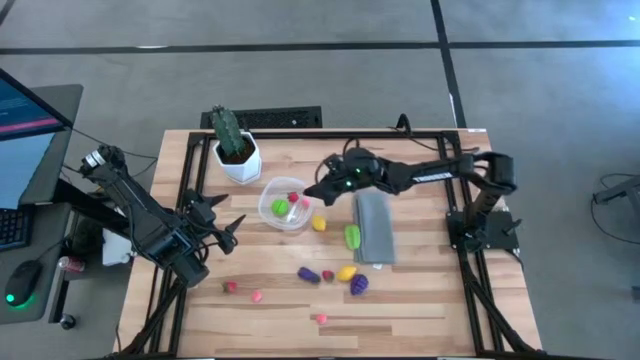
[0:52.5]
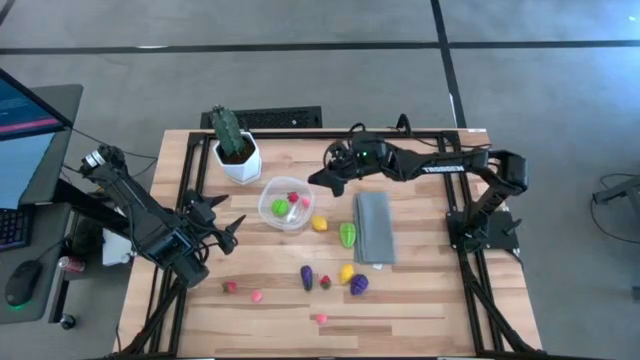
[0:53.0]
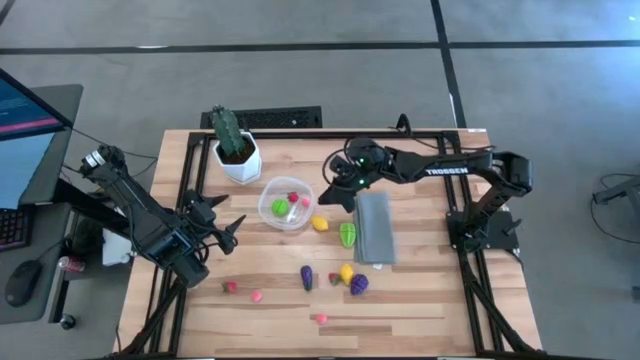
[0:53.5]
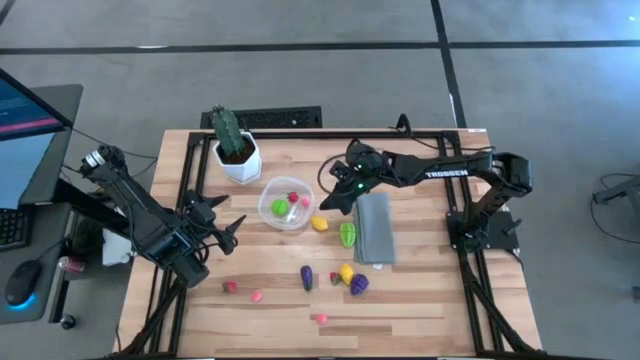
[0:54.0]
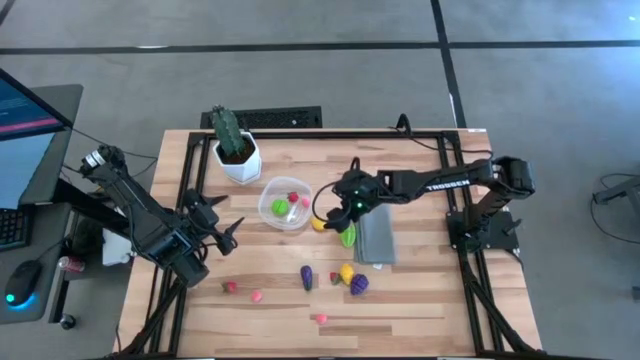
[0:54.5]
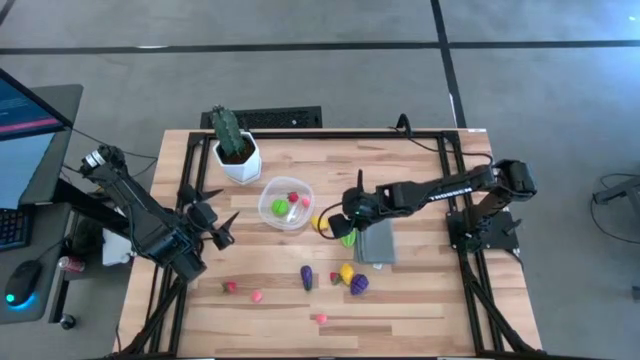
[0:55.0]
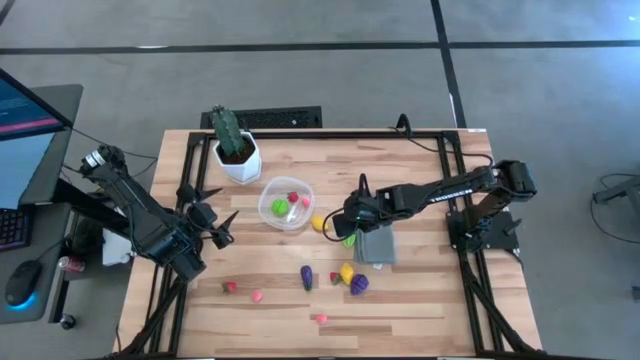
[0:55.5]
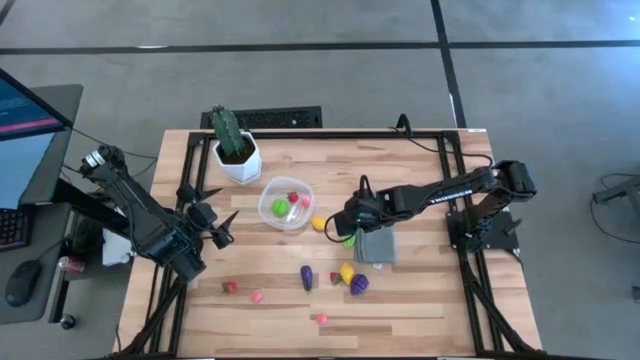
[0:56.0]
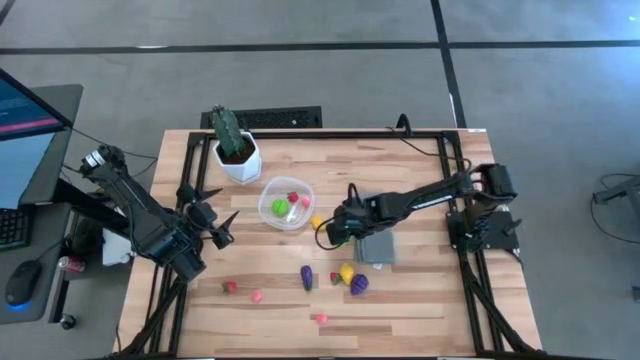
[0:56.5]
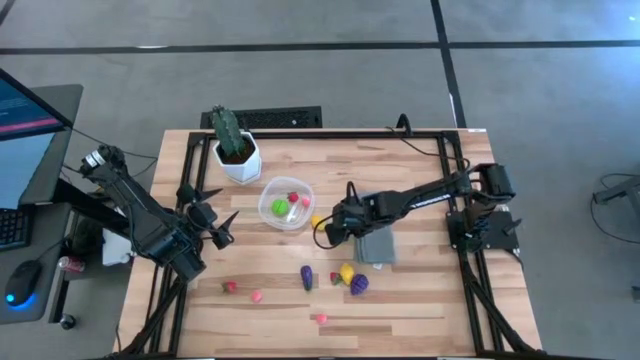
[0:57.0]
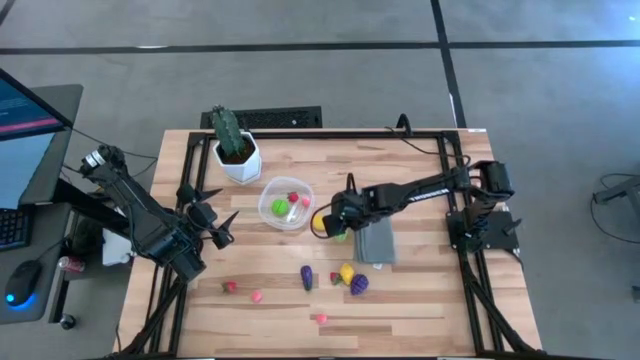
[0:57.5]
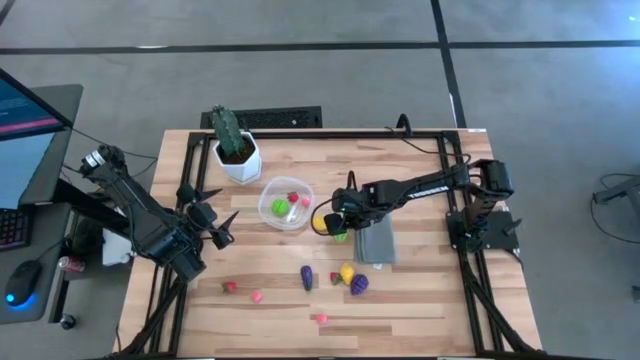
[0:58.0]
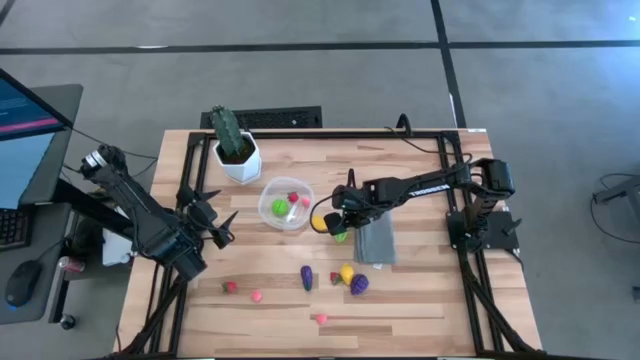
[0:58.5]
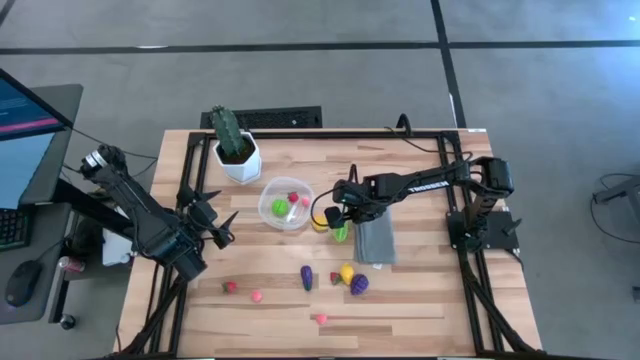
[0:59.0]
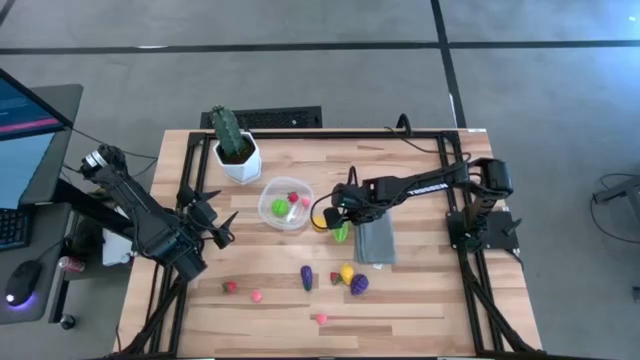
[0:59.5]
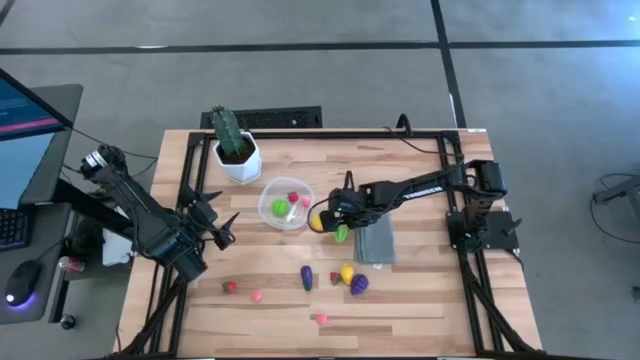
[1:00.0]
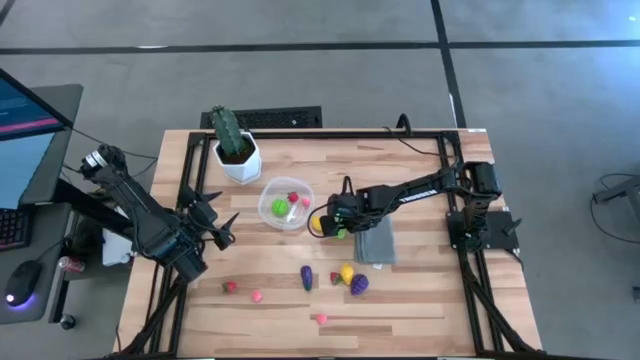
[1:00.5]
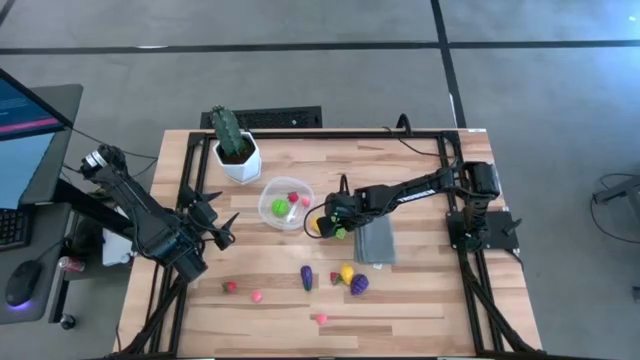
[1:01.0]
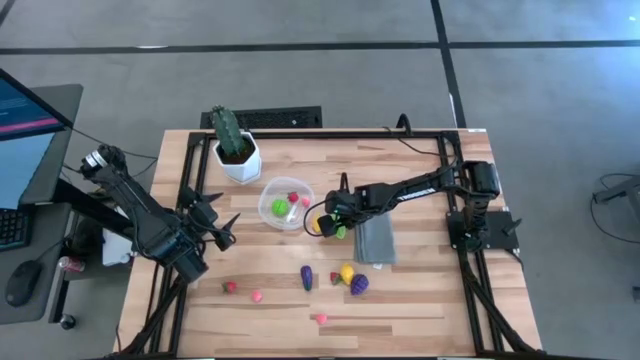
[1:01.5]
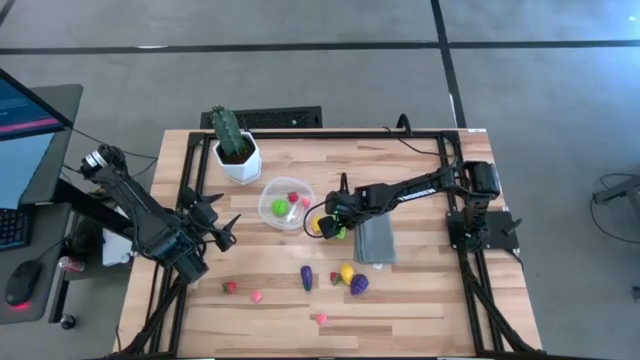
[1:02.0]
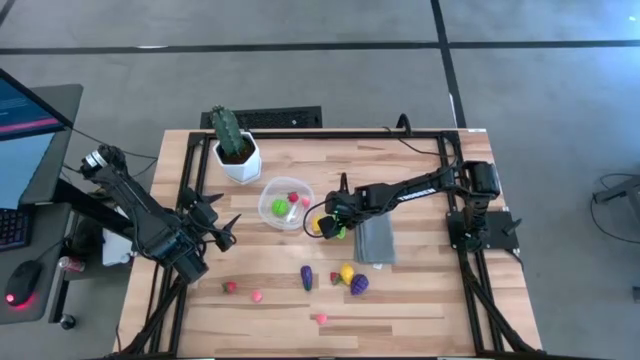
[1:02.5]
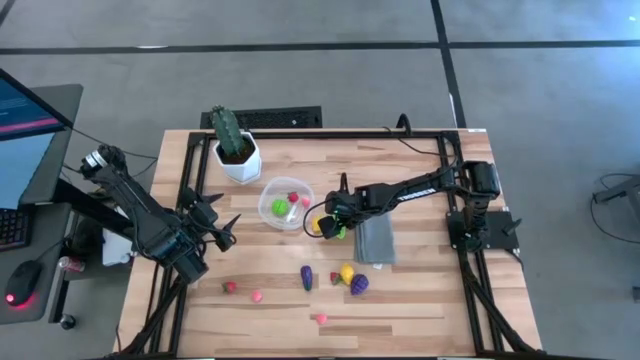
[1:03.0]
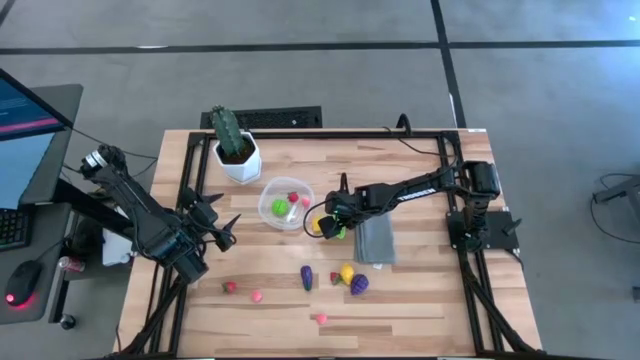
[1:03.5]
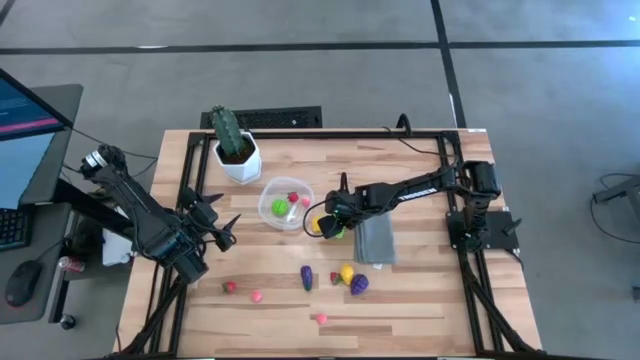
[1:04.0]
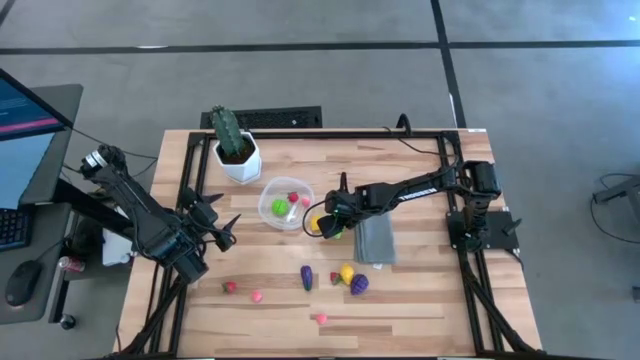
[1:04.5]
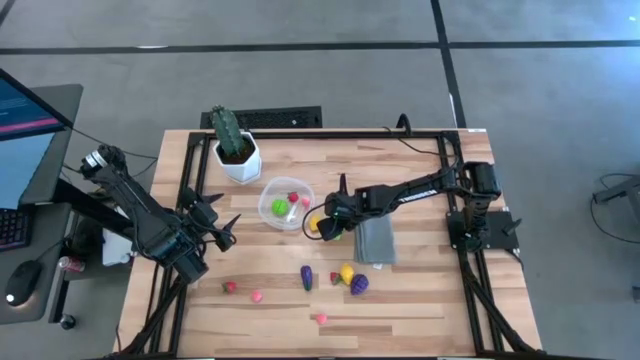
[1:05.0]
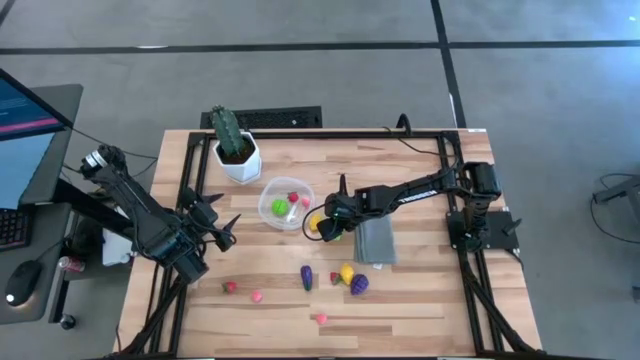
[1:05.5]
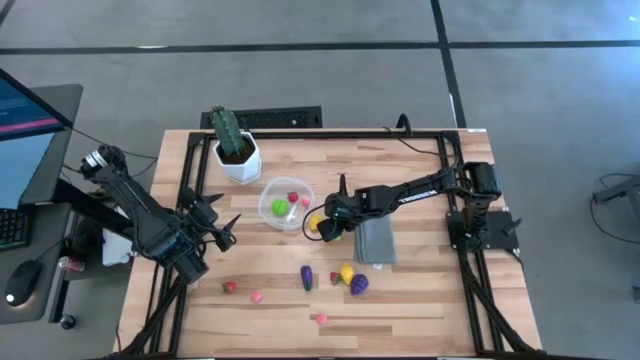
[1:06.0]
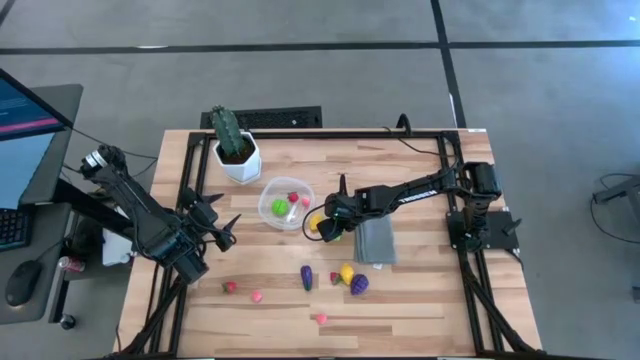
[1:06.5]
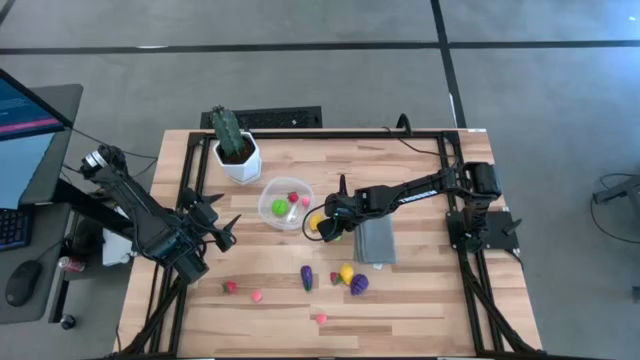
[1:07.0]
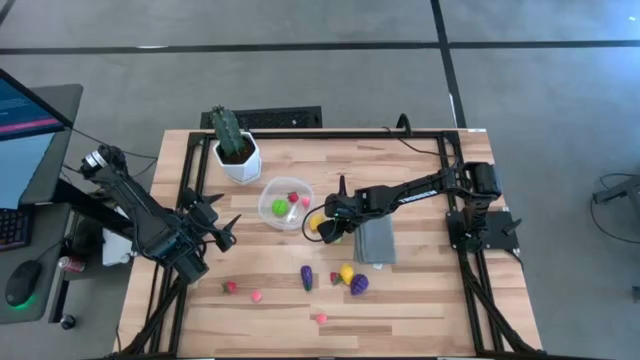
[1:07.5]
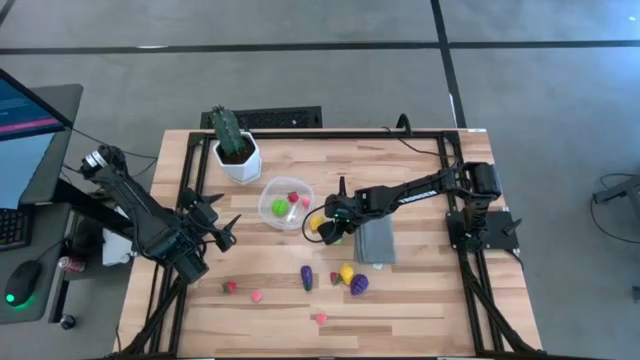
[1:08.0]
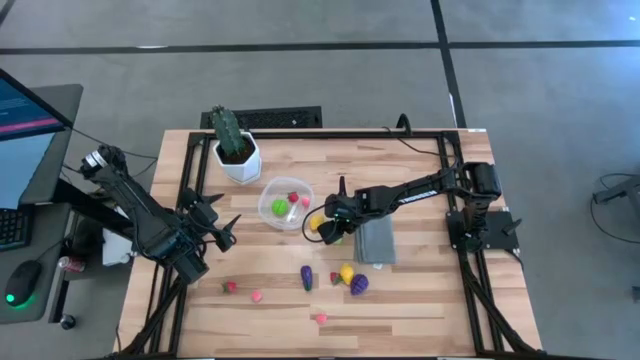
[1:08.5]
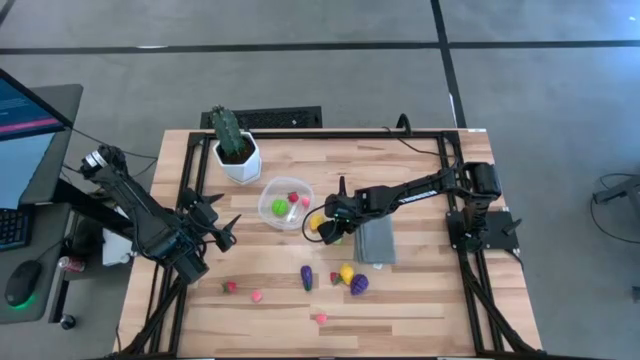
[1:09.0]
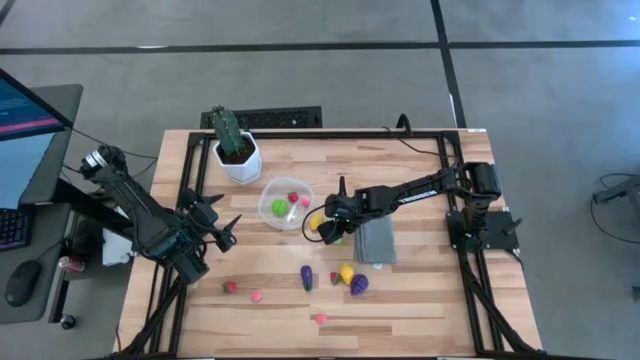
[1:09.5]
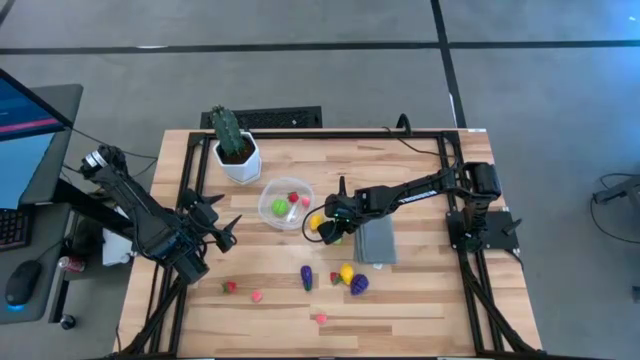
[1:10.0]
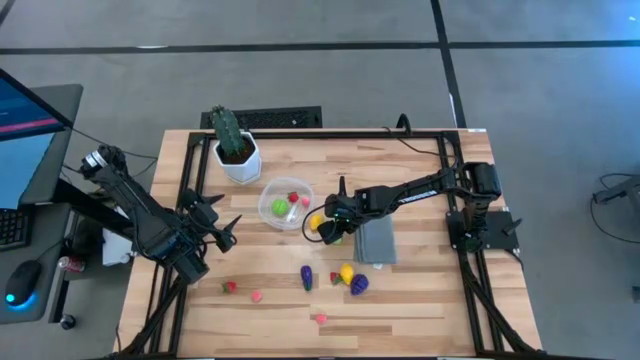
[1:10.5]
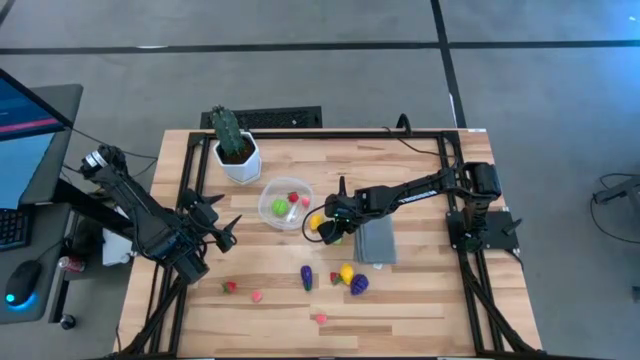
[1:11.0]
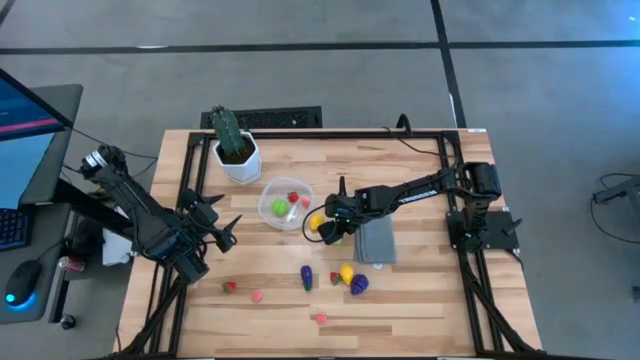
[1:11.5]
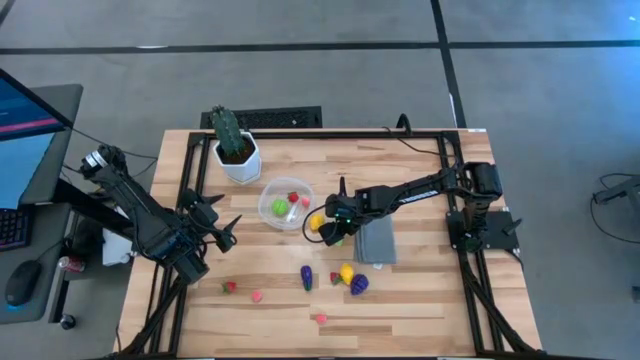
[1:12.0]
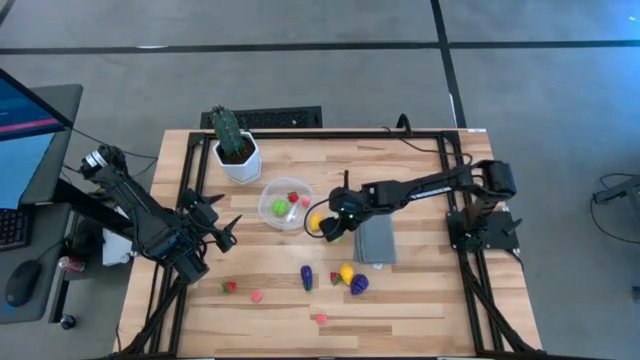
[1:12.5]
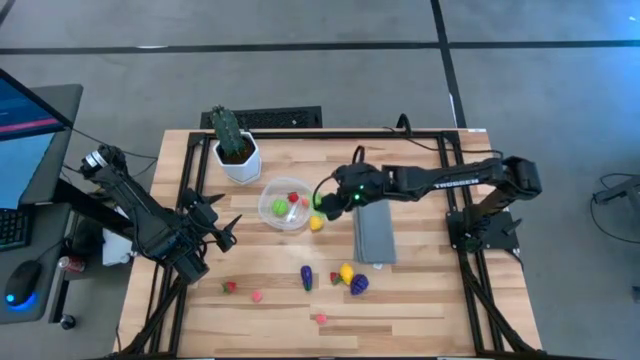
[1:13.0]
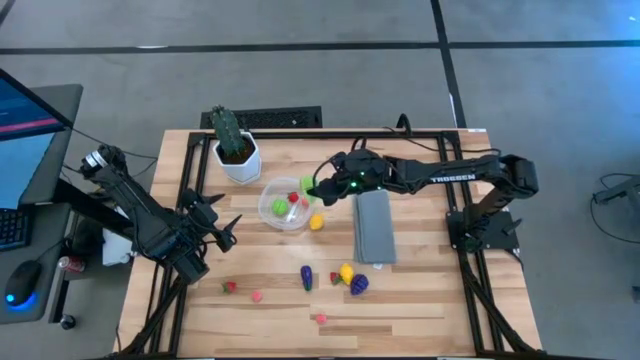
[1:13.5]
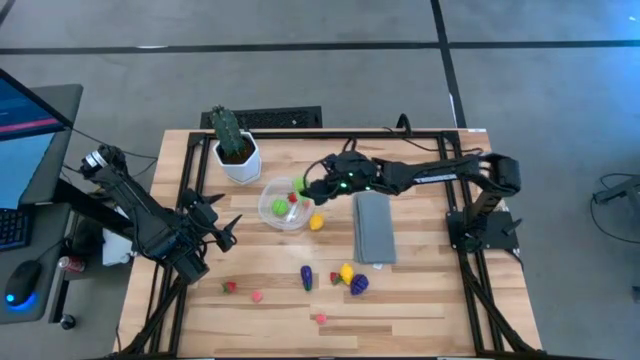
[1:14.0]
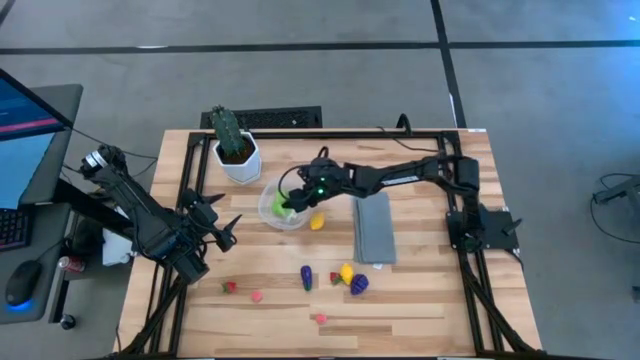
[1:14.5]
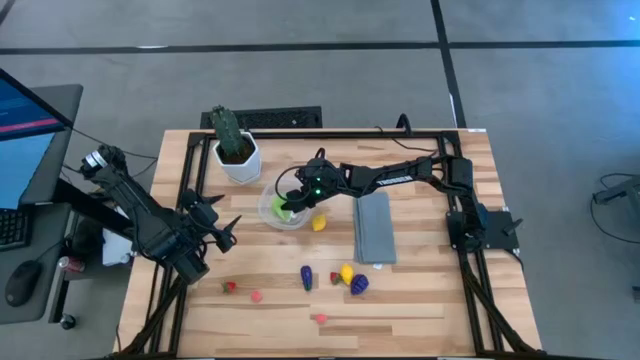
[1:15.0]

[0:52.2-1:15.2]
Task: Pick and placing Produce into tupperware
Put the green starfruit into the transparent container
